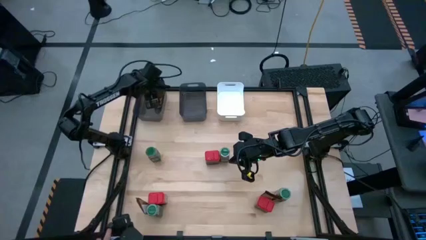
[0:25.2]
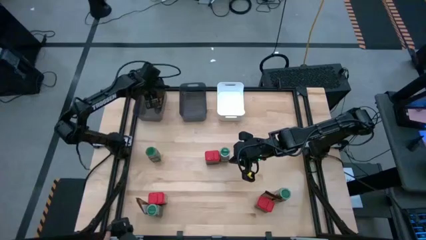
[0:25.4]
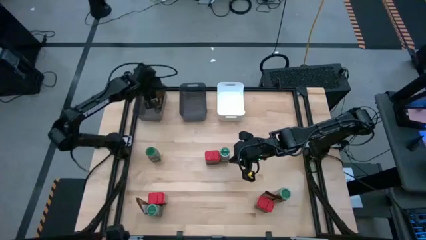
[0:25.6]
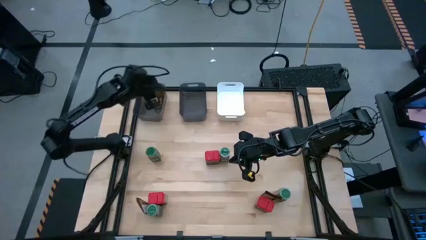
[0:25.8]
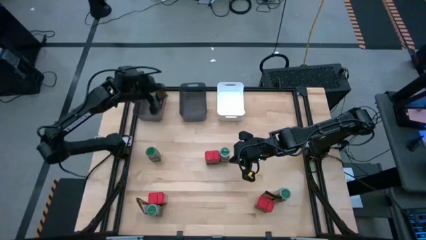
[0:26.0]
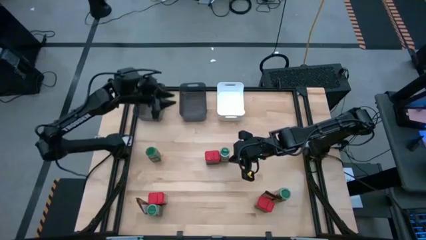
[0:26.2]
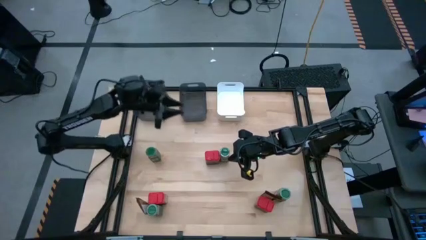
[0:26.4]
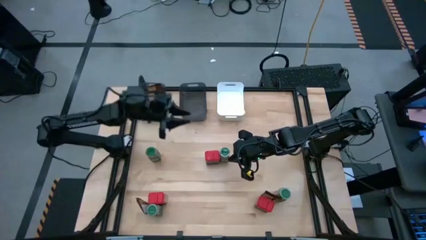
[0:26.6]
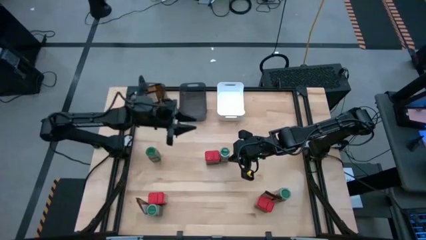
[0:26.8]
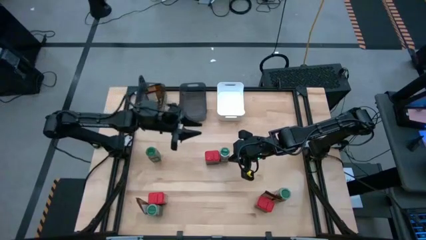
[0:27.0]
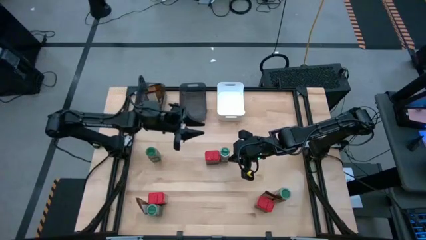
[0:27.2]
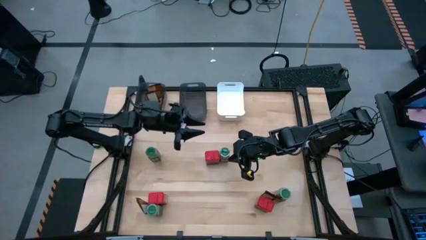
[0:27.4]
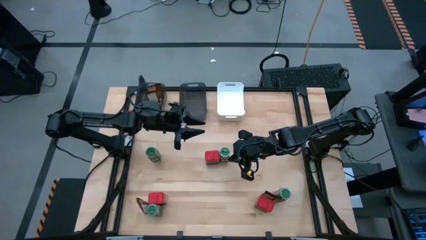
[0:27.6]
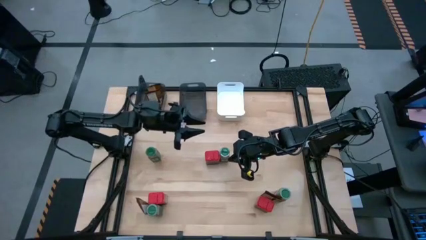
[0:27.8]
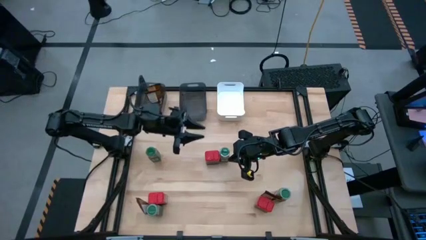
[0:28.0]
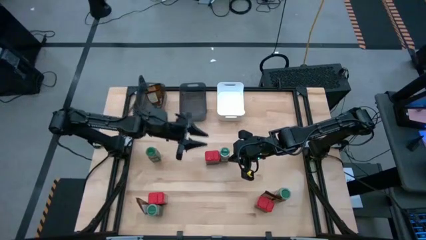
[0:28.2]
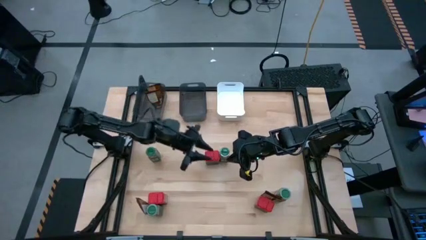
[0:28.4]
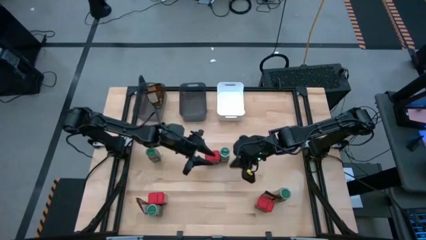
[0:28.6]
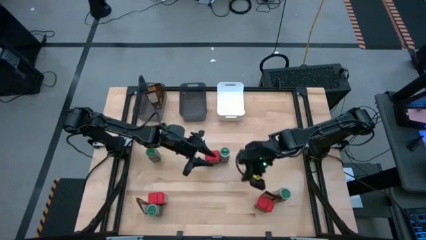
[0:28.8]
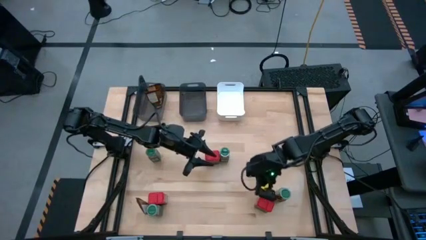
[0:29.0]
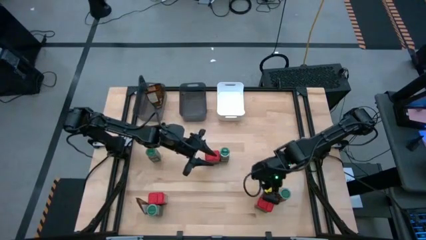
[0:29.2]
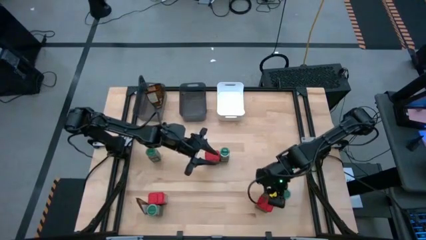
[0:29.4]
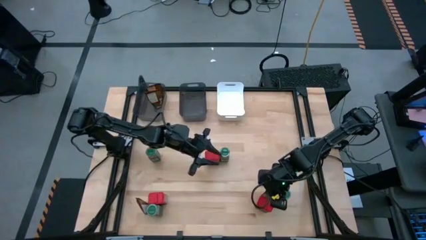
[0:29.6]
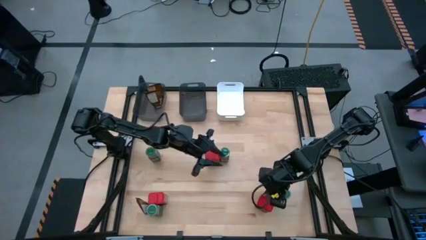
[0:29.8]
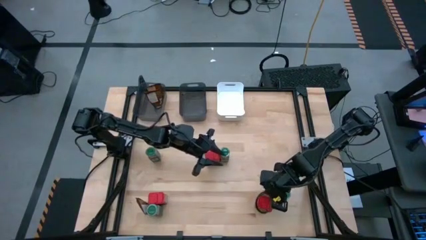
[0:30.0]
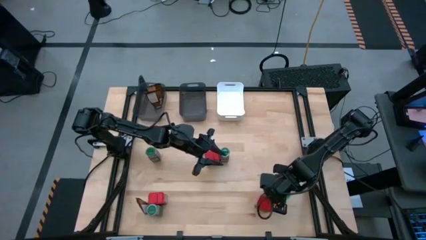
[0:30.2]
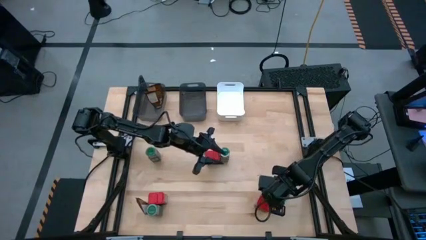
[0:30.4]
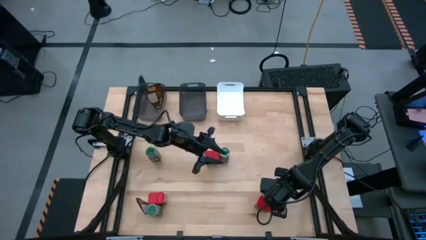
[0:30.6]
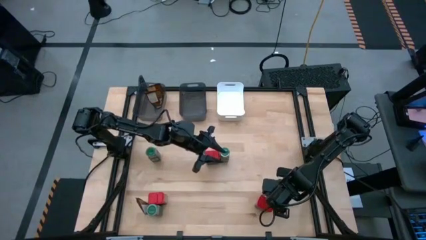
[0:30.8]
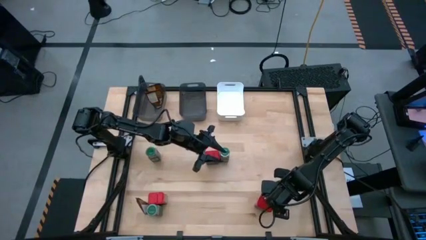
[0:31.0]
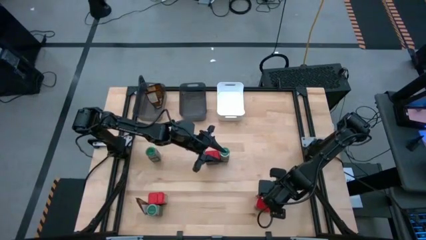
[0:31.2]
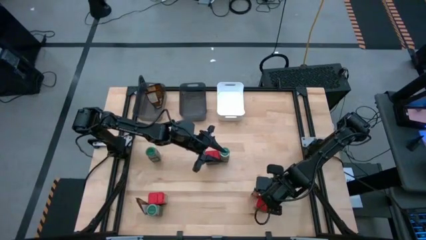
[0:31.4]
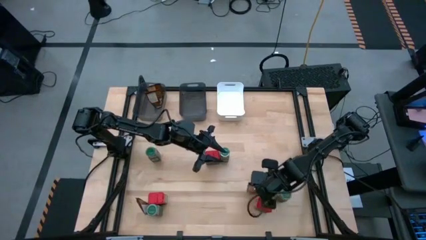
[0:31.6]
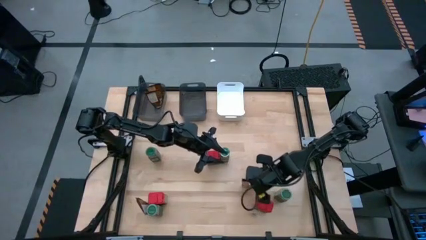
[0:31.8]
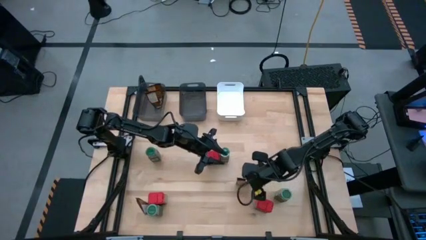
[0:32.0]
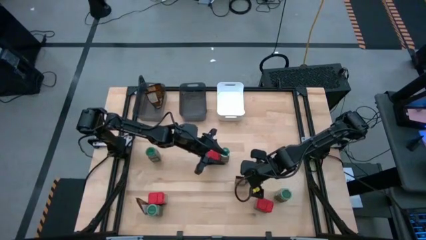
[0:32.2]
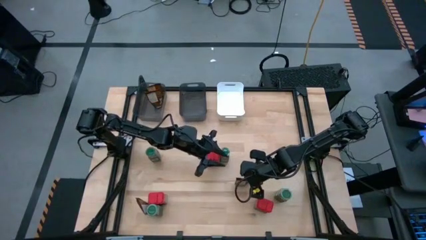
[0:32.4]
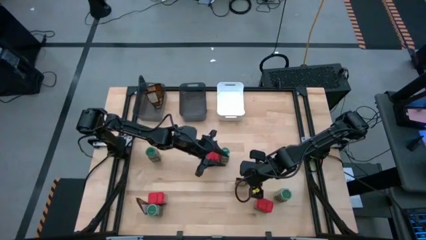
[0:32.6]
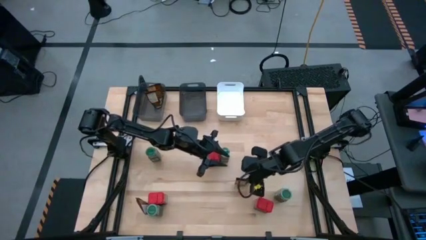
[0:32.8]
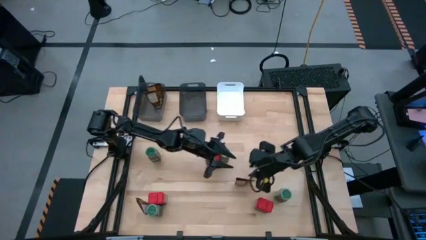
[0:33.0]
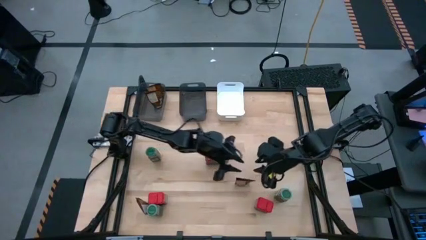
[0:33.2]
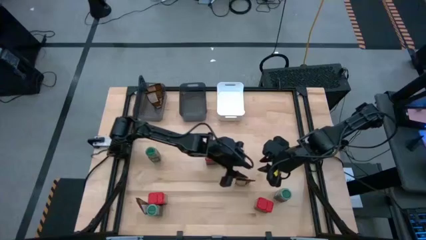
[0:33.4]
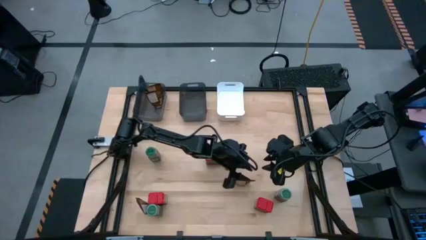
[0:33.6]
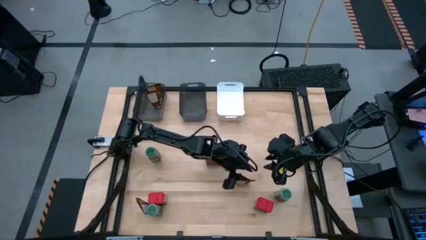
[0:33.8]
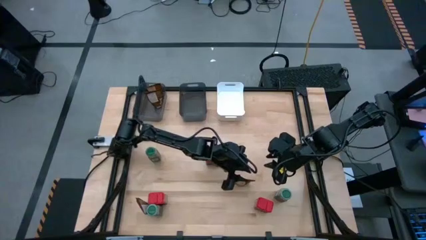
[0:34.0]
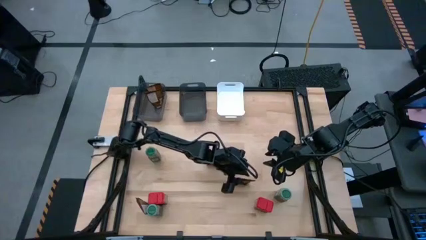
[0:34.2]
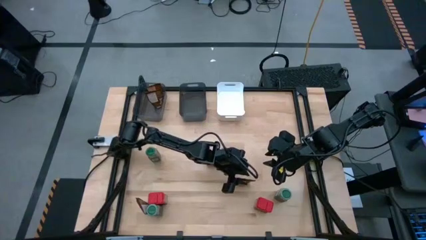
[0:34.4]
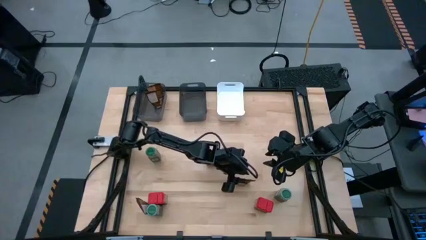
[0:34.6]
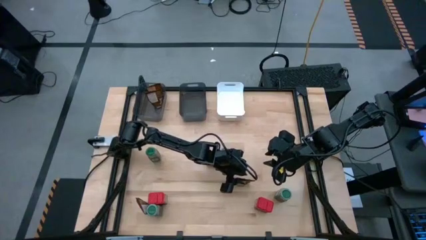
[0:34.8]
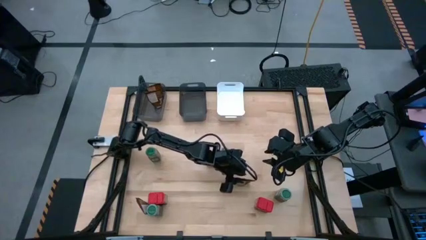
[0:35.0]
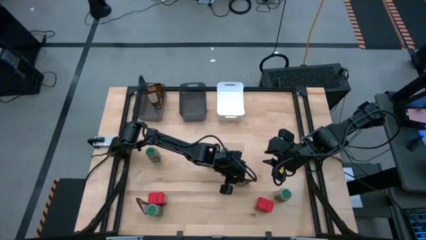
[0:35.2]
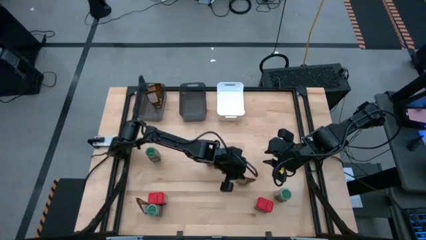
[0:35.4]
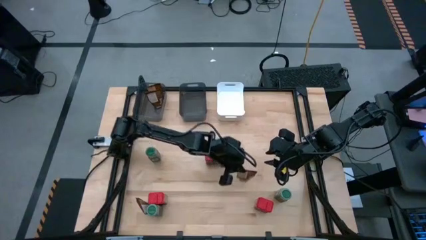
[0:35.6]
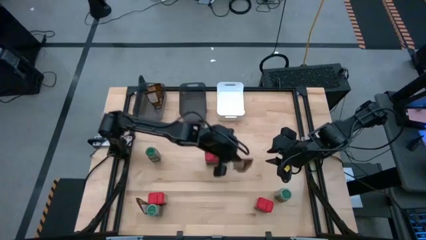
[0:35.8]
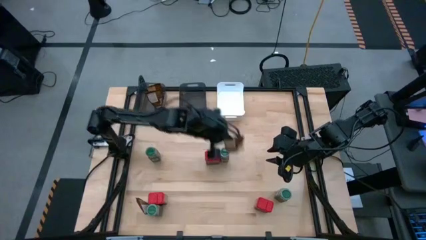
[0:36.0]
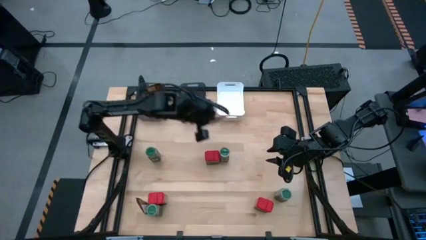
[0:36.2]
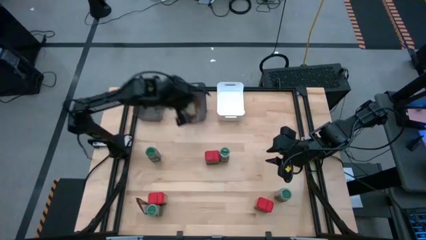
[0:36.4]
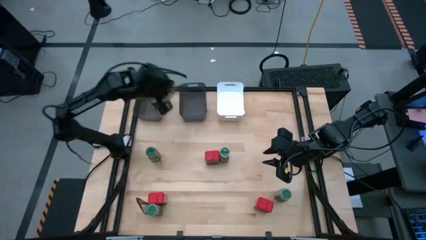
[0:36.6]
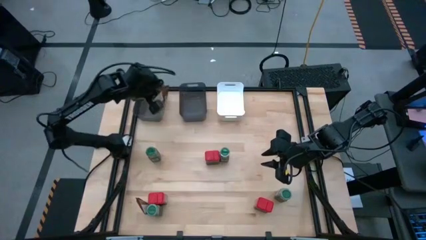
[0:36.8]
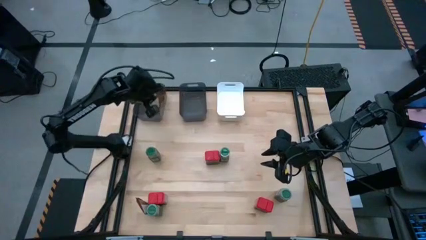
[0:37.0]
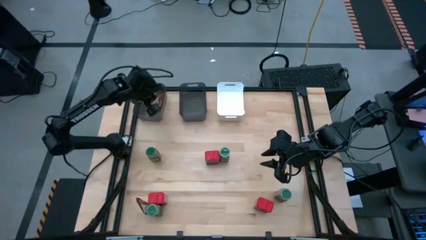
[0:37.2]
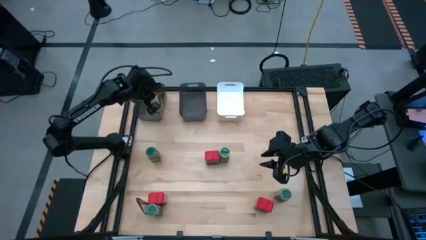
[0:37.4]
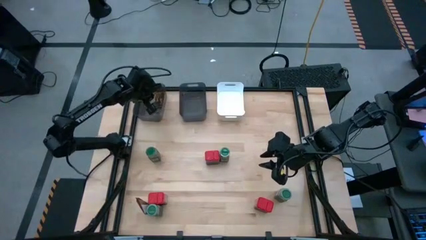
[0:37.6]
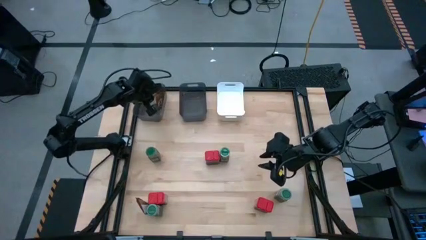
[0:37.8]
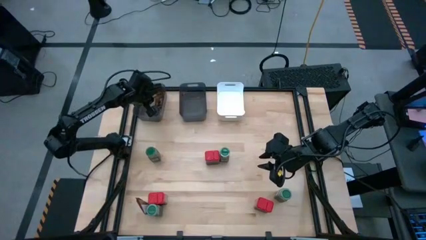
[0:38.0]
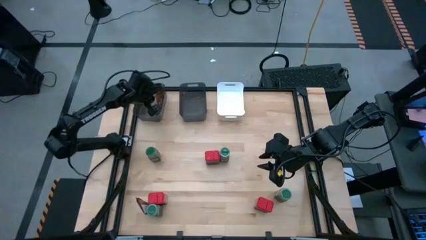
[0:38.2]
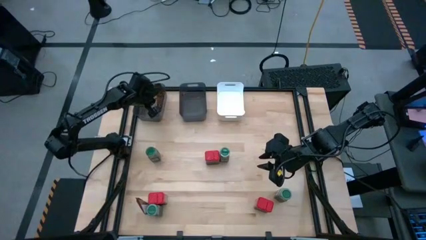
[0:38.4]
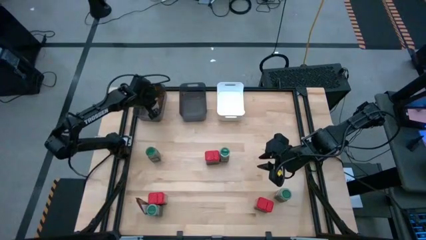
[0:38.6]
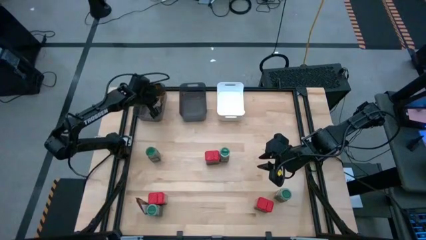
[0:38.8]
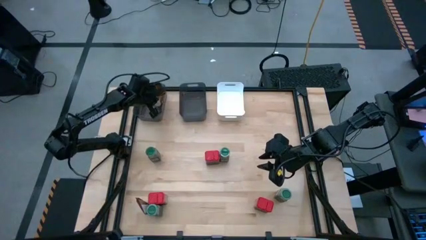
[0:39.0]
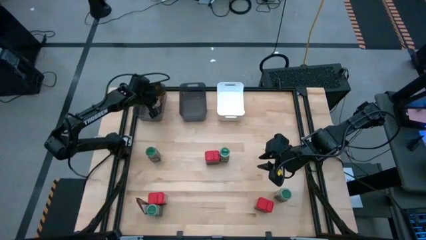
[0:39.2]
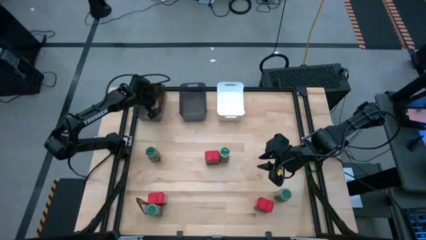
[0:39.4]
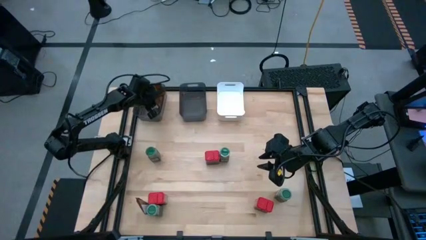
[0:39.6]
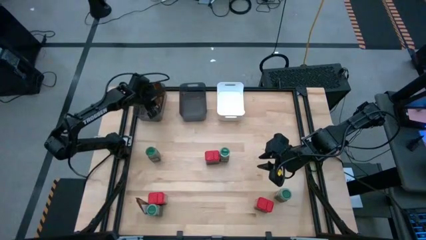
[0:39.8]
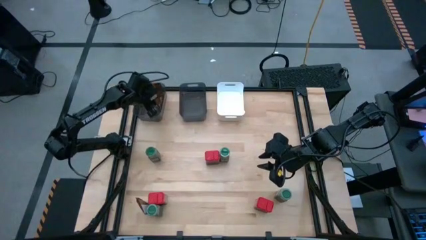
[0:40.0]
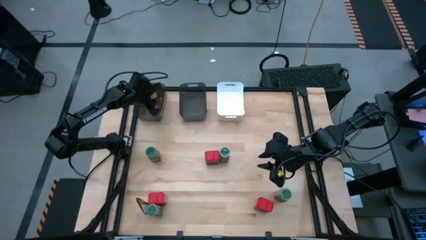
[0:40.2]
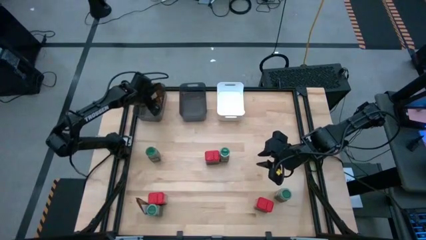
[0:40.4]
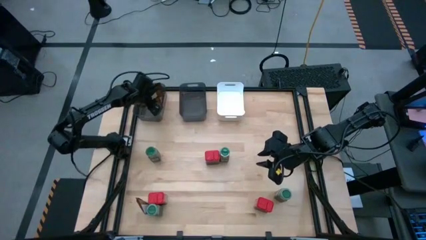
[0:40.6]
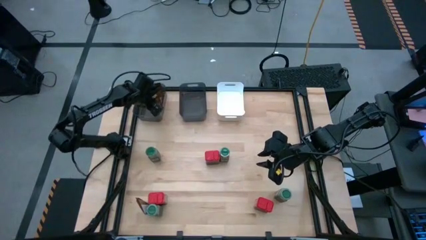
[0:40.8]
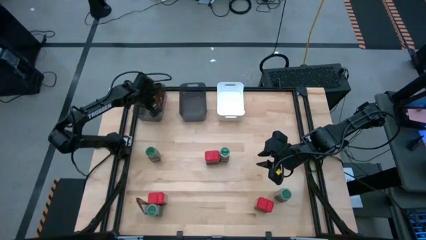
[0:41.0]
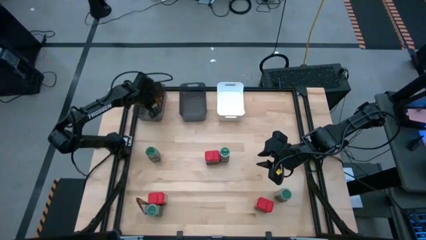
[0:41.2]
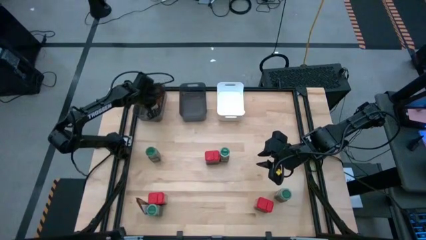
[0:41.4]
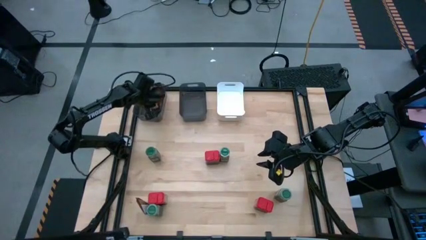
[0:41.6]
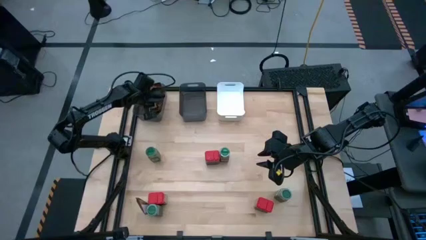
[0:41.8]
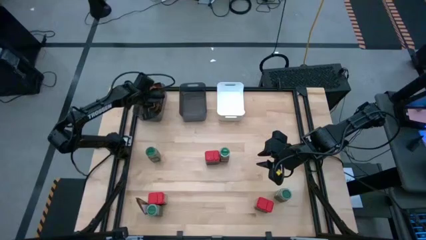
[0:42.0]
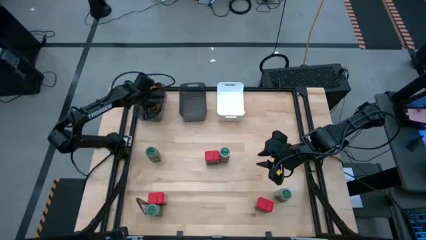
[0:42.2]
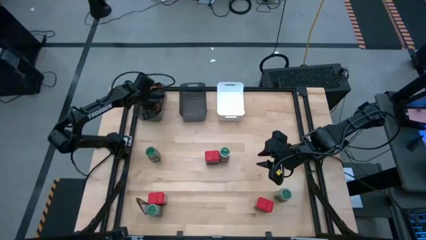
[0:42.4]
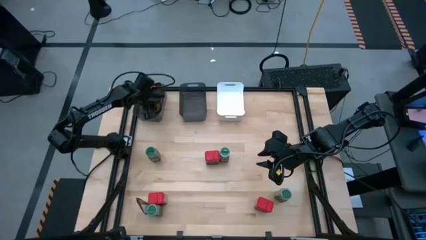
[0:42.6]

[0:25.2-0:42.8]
Task: Sort spices by type
Put the right brown seasoning sachet into the left black bin
